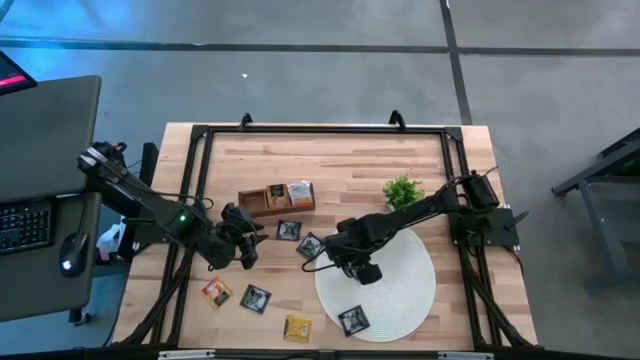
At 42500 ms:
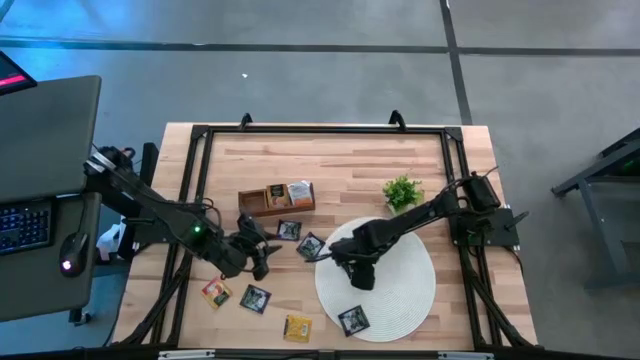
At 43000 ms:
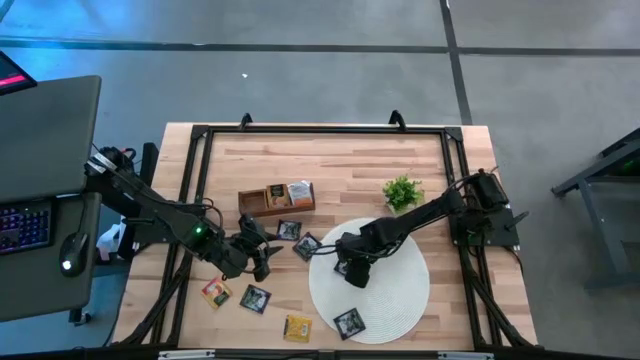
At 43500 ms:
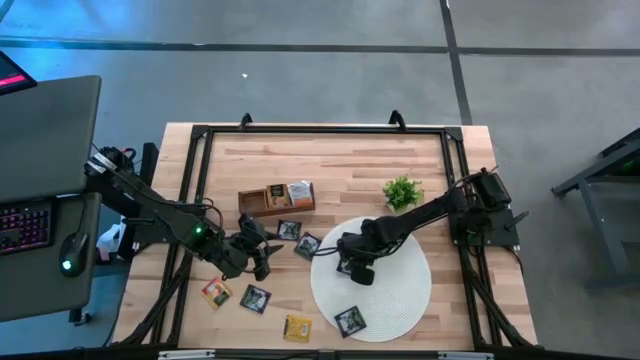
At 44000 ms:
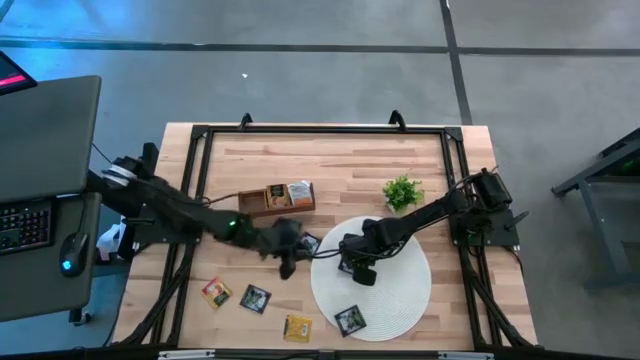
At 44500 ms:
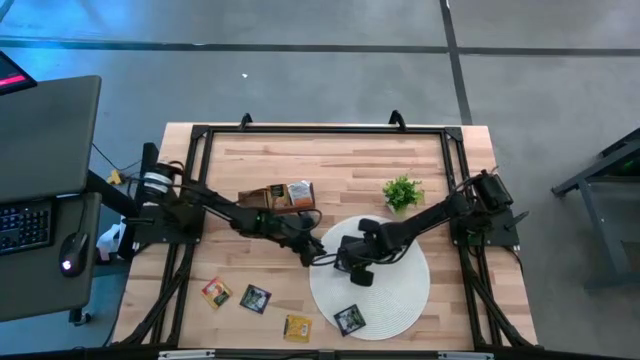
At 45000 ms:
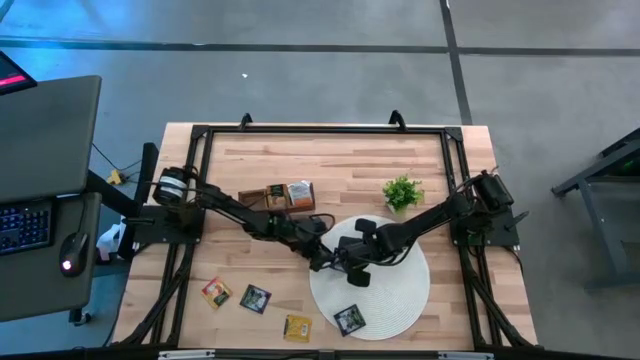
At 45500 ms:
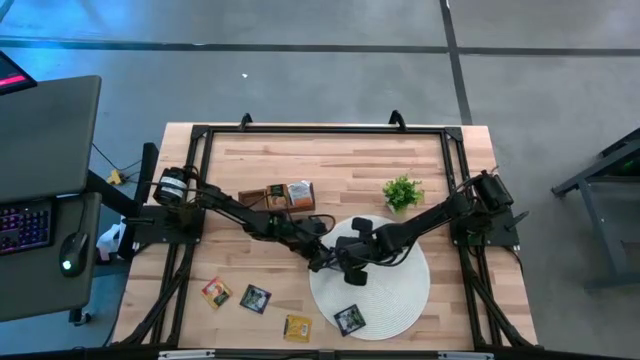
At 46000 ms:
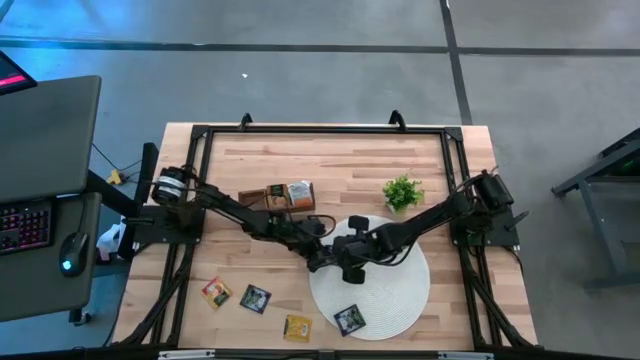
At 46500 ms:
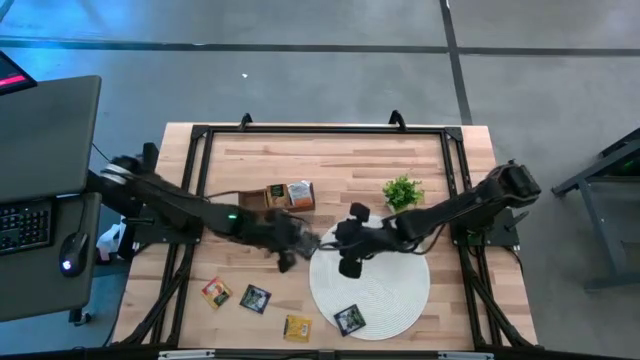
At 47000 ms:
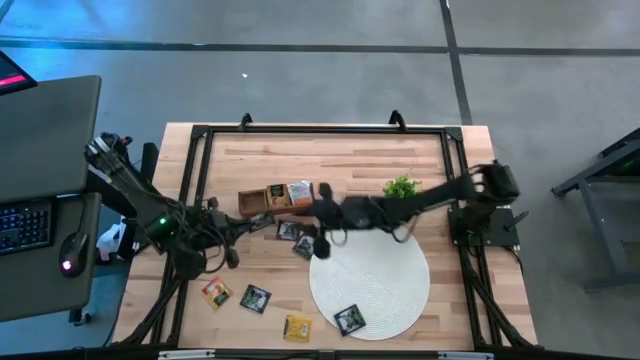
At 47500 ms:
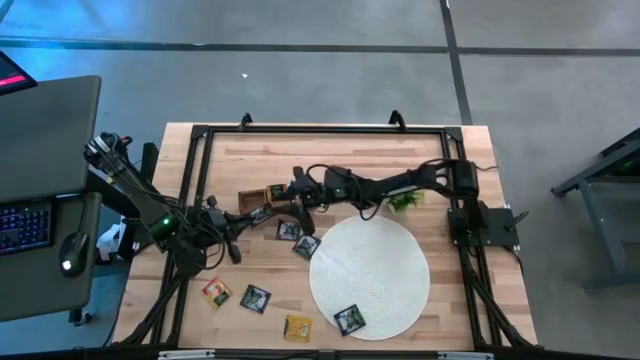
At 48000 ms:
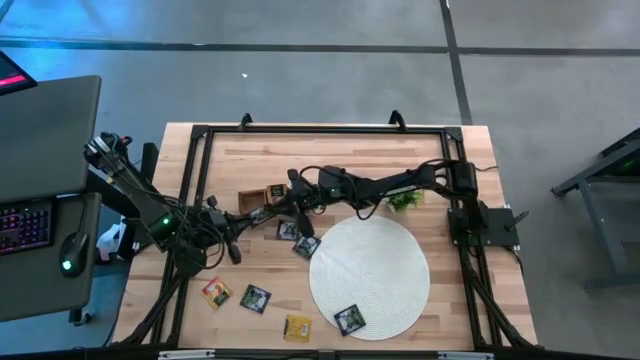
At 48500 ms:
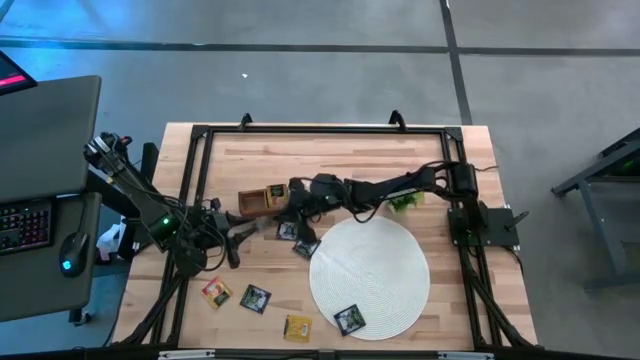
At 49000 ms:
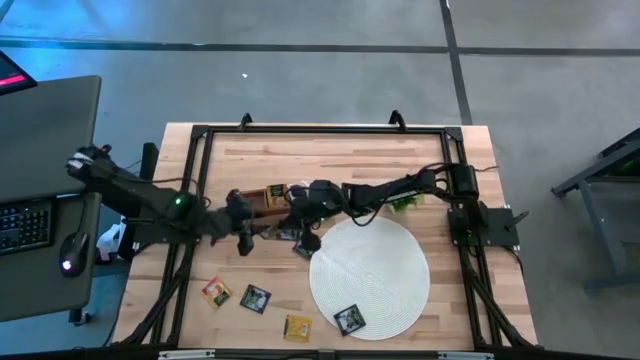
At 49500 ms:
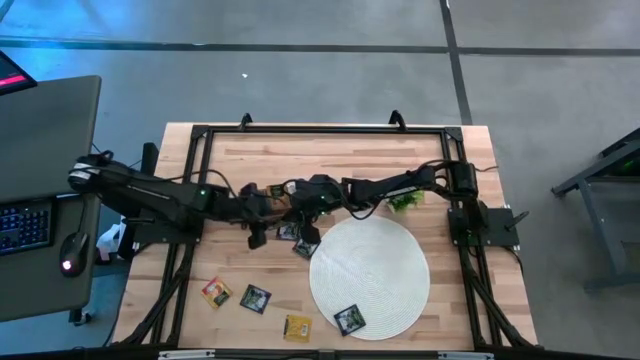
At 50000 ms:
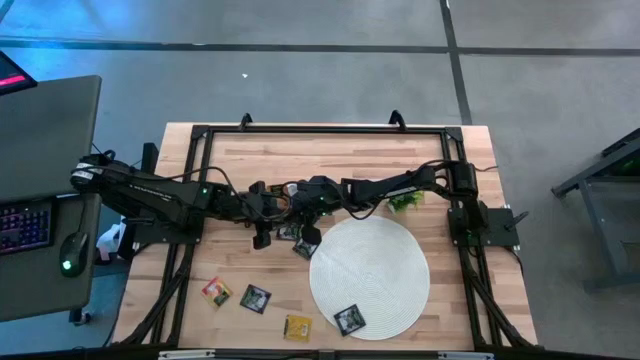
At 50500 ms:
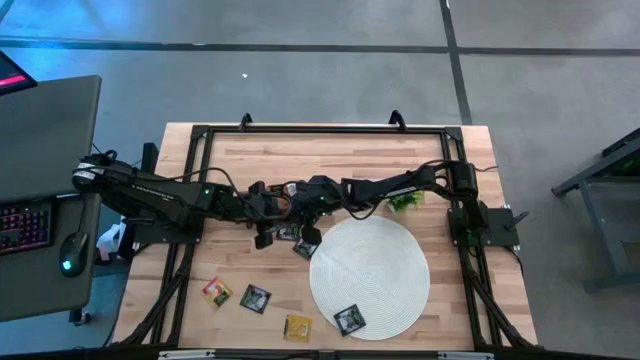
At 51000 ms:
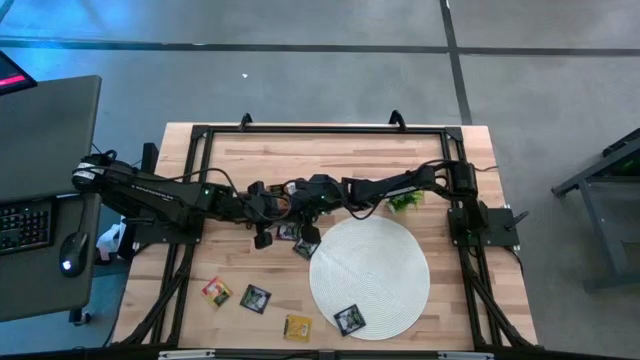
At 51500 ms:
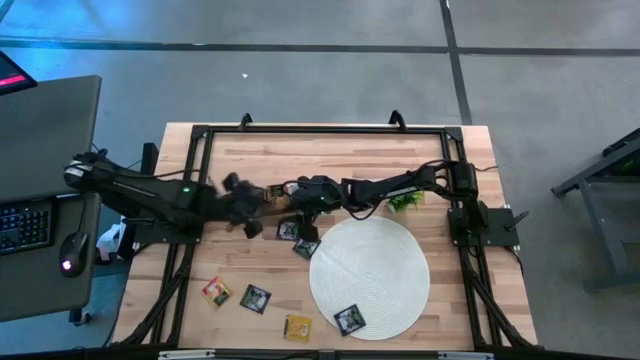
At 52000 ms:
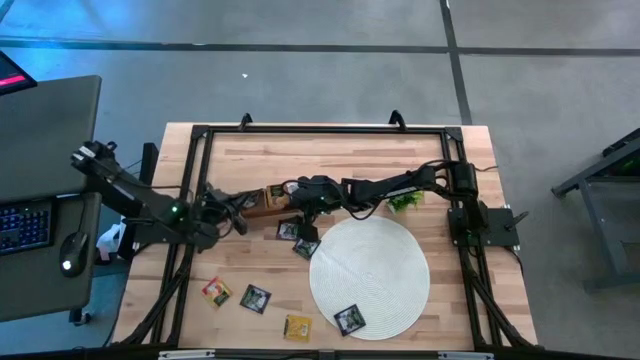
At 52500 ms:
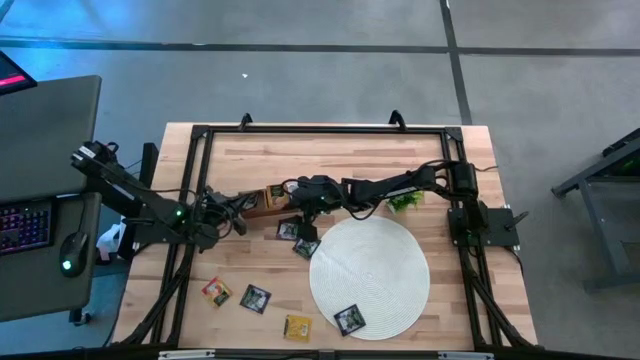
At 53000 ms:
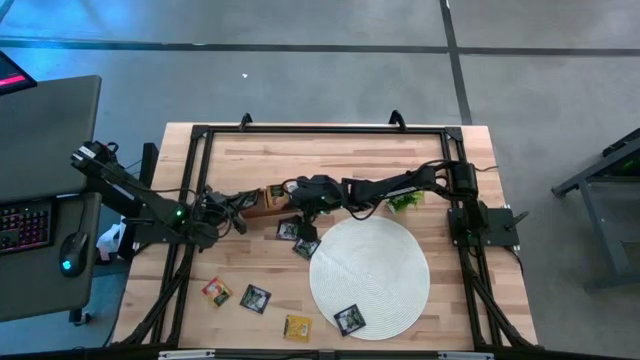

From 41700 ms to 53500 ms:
Task: Pick & Place Tea
Put the violet tea bag into the left section of the wooden organizer

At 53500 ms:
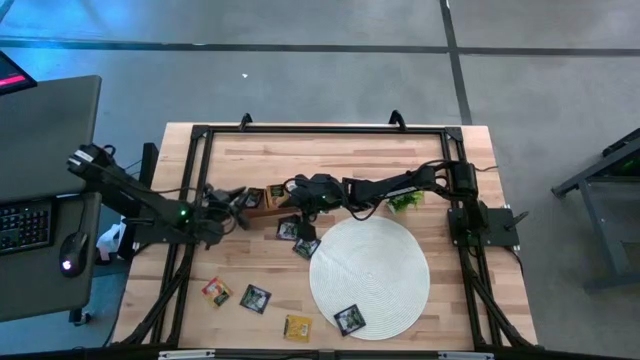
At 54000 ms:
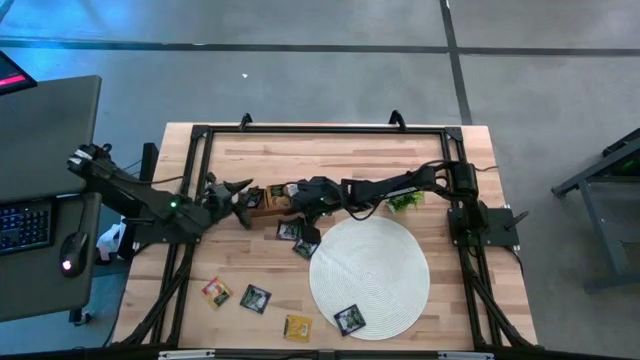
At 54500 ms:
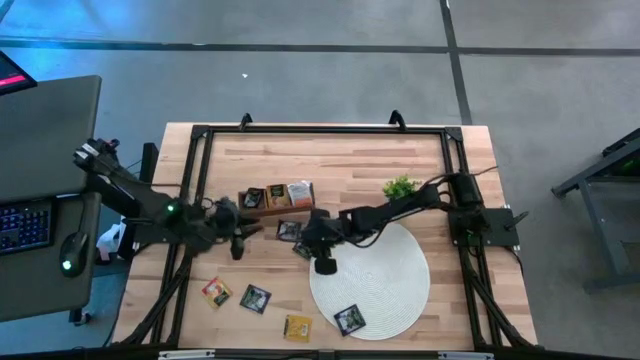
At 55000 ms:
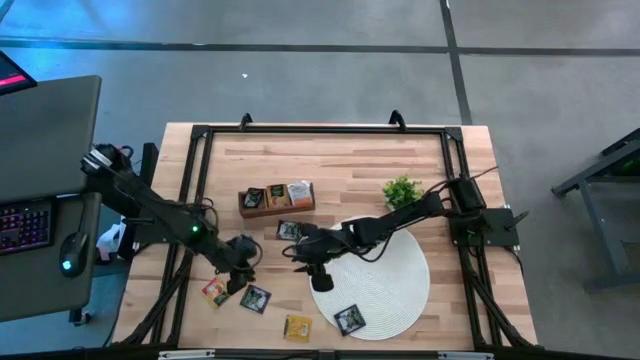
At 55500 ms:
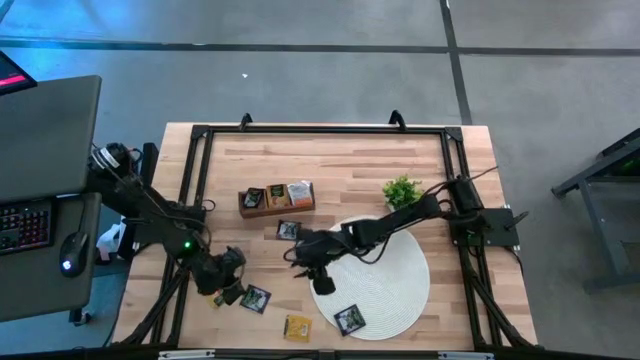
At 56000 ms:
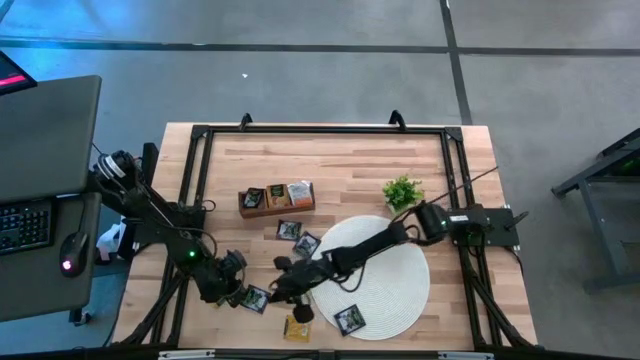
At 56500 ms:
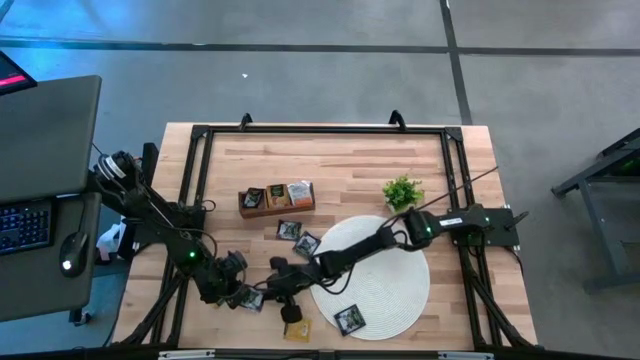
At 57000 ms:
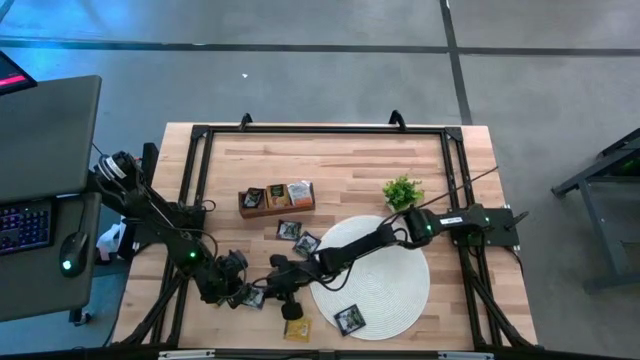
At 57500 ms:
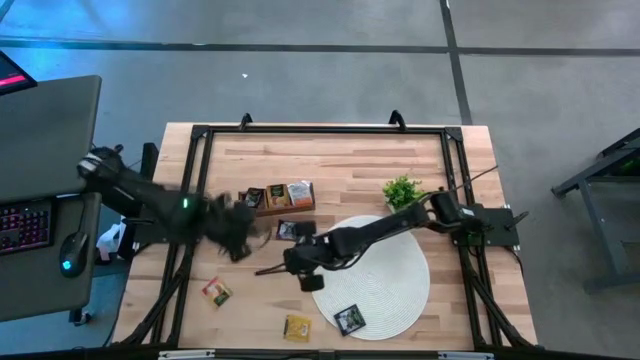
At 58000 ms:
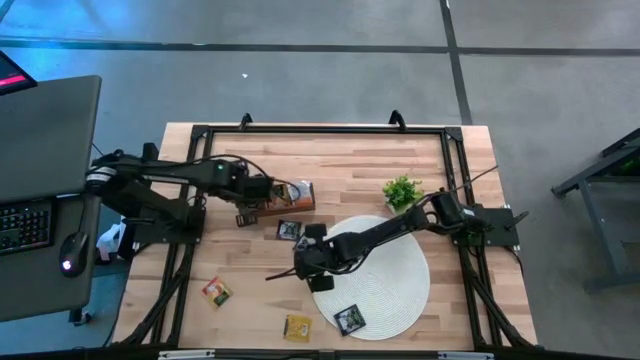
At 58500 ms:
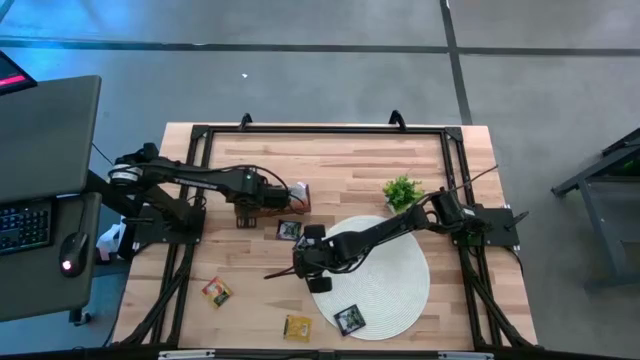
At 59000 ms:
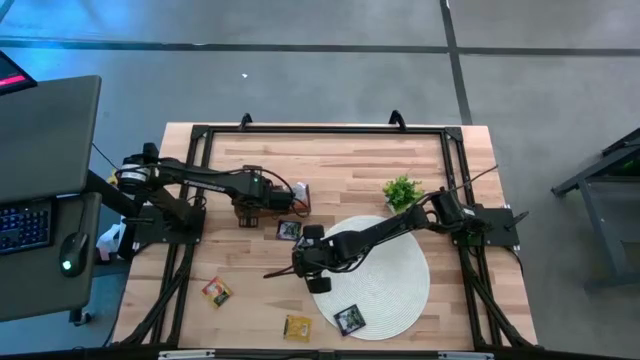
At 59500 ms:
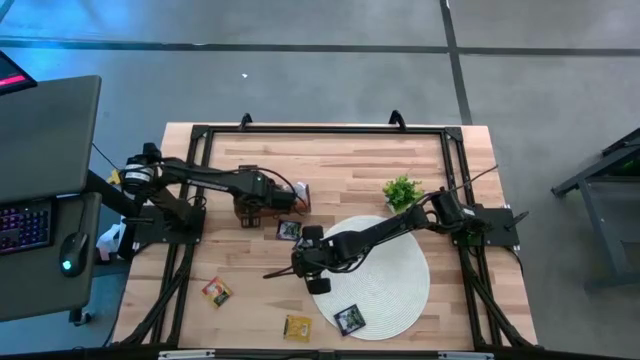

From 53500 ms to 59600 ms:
Put the violet tea bag into the left section of the wooden organizer

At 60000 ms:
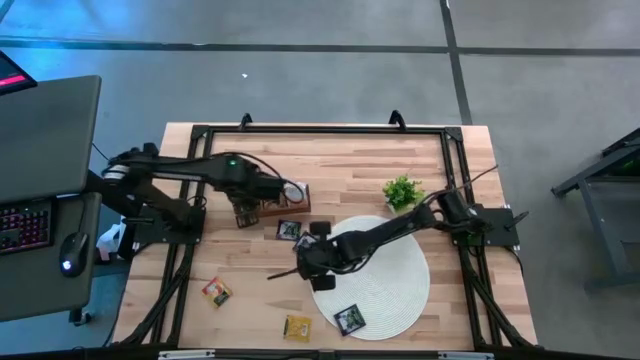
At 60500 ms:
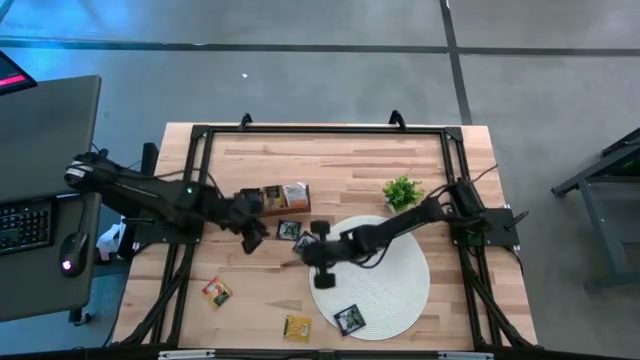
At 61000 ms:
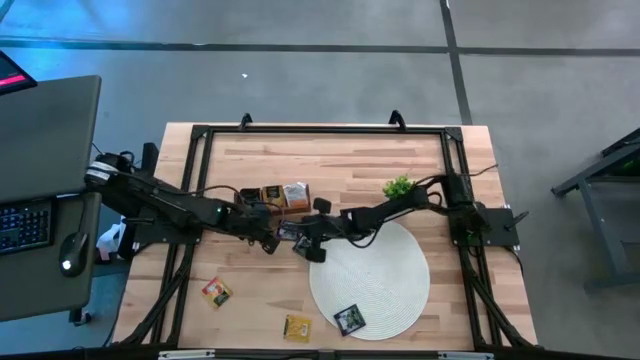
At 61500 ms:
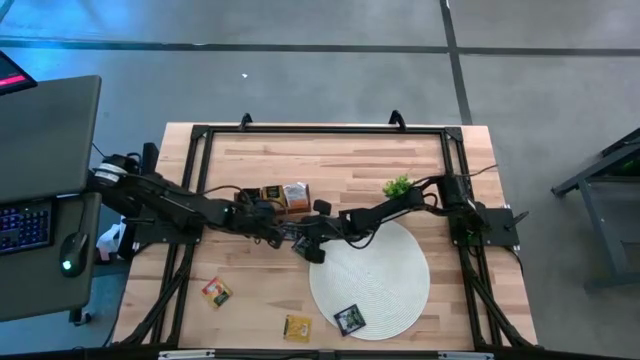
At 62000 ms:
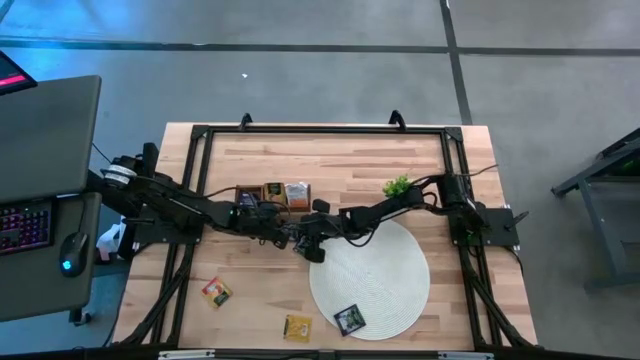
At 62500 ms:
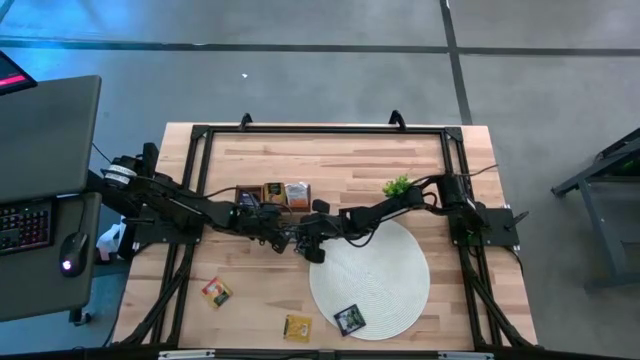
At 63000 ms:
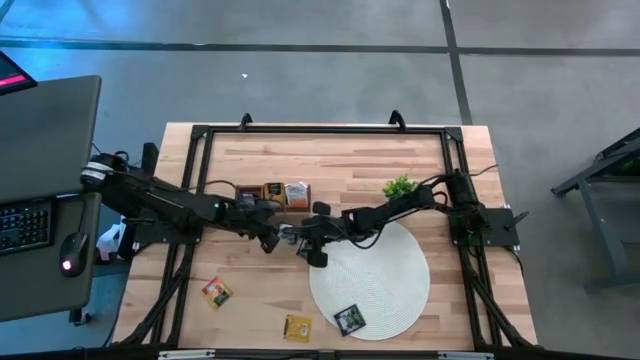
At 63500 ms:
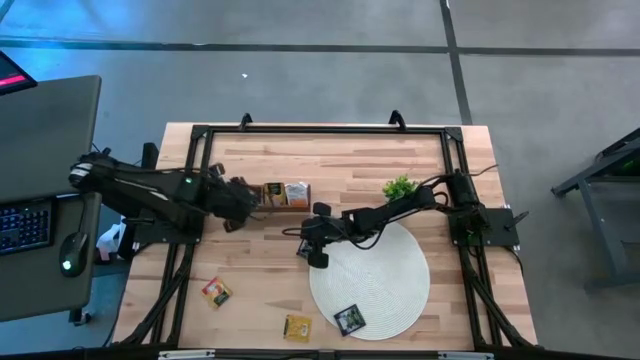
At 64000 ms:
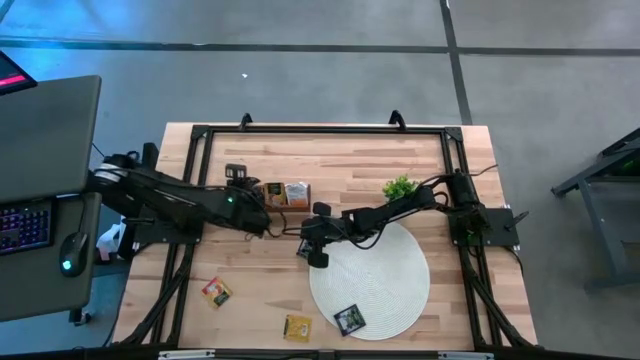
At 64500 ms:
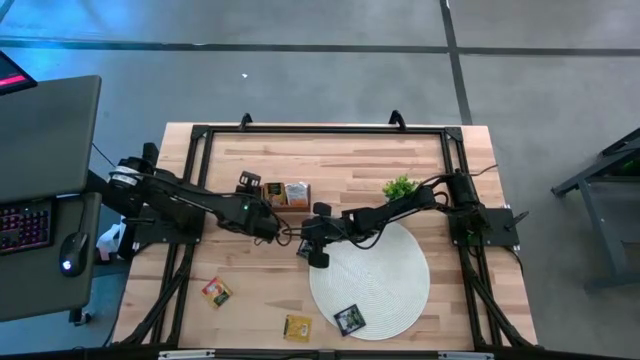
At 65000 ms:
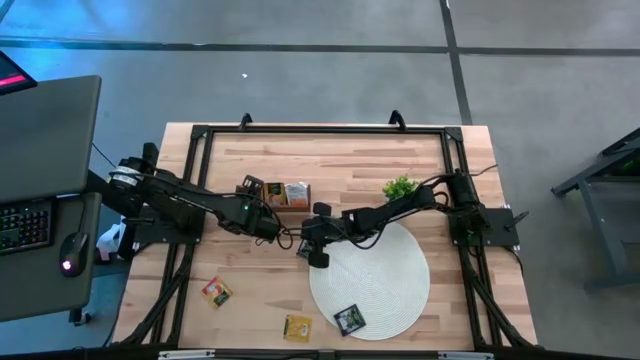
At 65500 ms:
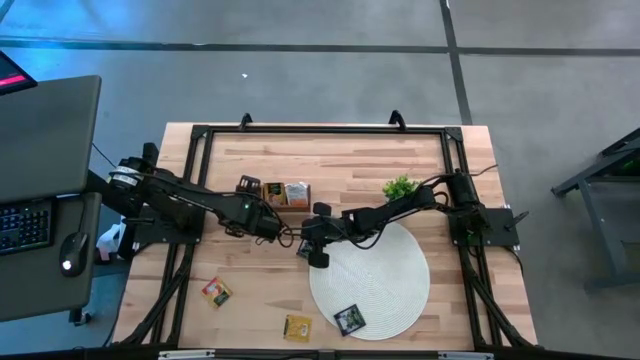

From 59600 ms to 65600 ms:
Put the violet tea bag into the left section of the wooden organizer
